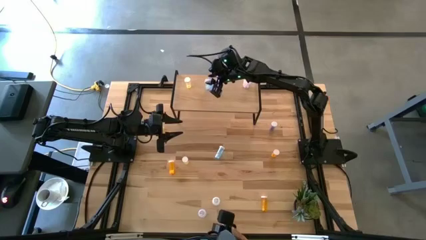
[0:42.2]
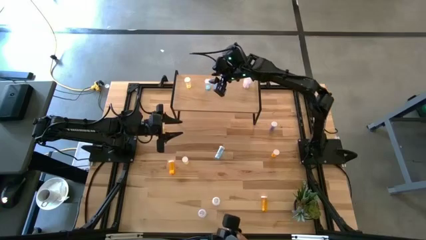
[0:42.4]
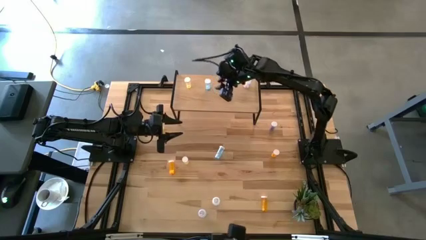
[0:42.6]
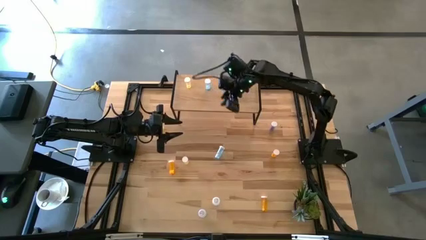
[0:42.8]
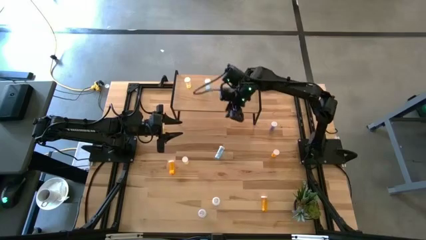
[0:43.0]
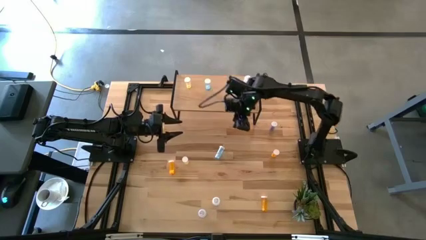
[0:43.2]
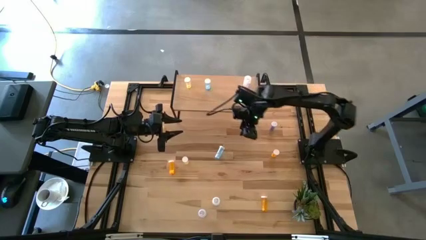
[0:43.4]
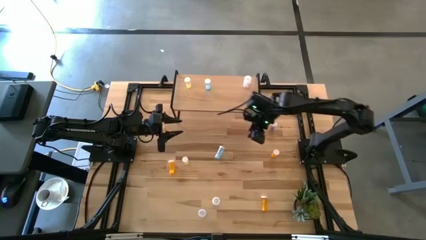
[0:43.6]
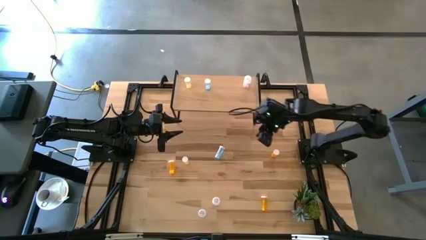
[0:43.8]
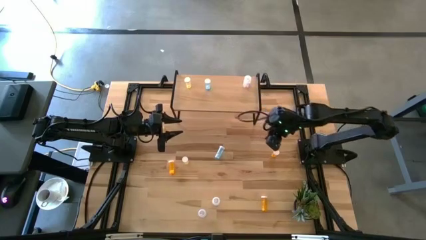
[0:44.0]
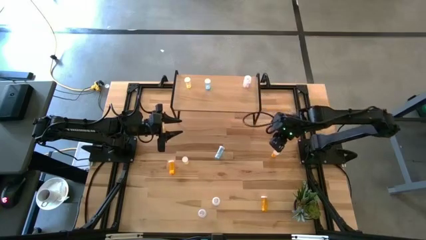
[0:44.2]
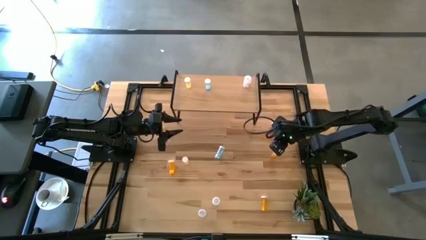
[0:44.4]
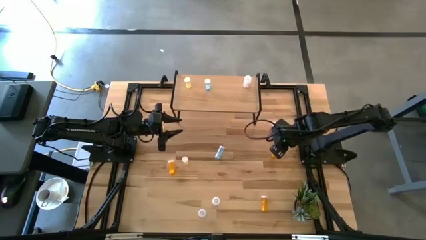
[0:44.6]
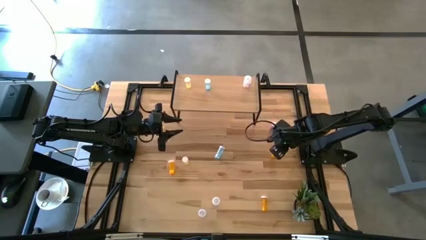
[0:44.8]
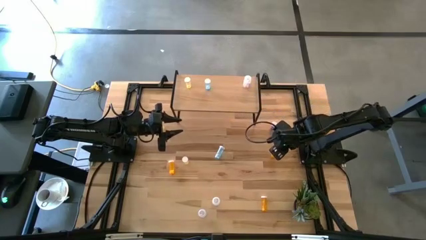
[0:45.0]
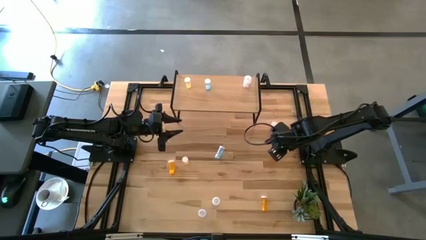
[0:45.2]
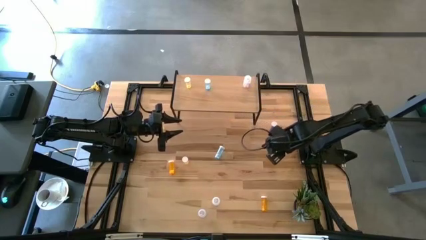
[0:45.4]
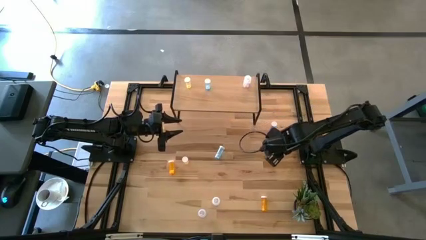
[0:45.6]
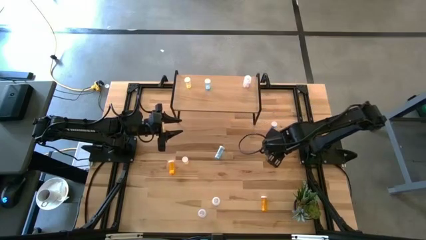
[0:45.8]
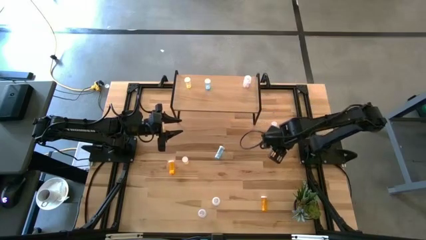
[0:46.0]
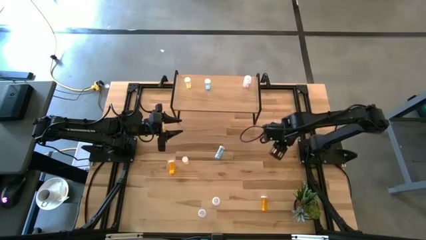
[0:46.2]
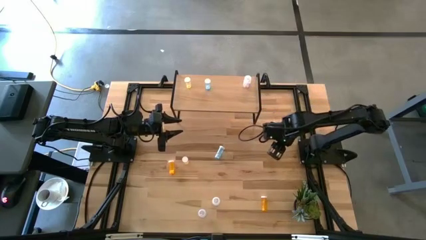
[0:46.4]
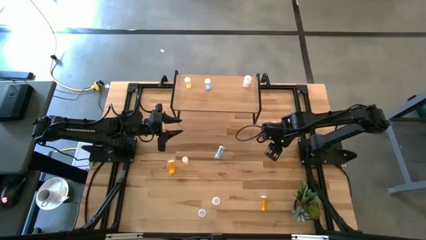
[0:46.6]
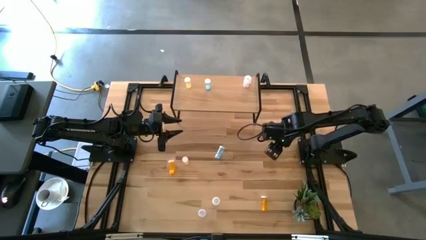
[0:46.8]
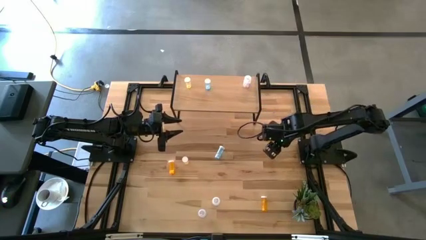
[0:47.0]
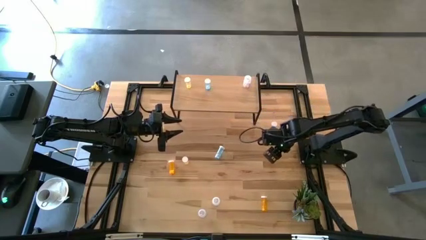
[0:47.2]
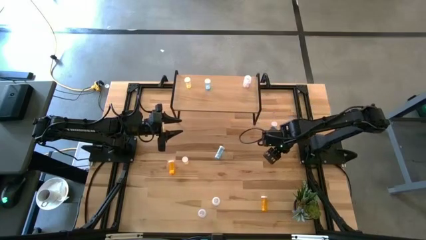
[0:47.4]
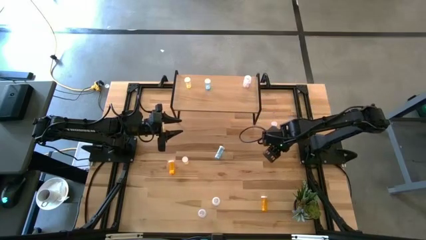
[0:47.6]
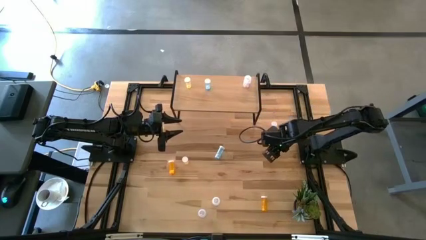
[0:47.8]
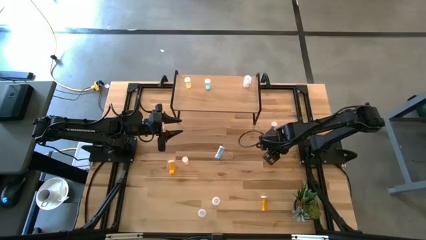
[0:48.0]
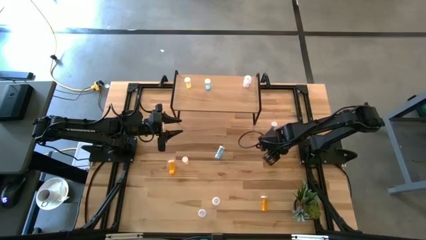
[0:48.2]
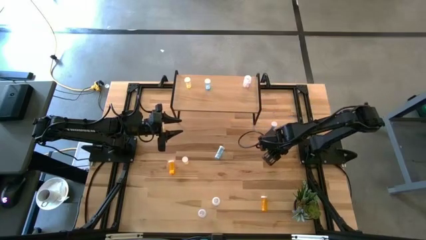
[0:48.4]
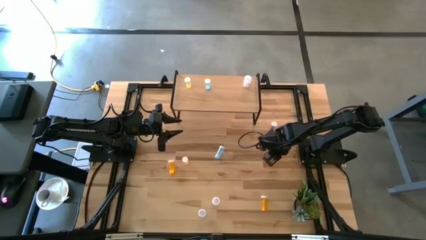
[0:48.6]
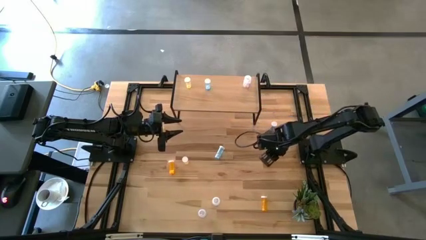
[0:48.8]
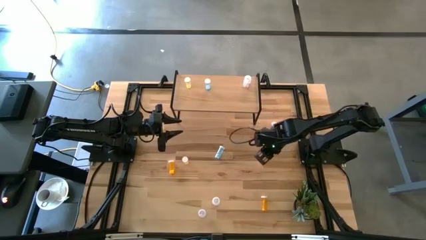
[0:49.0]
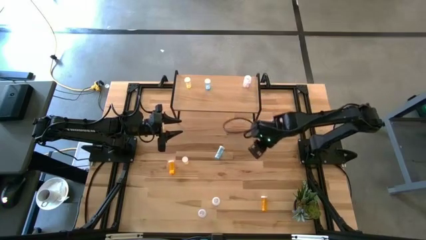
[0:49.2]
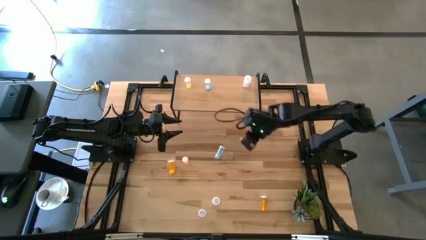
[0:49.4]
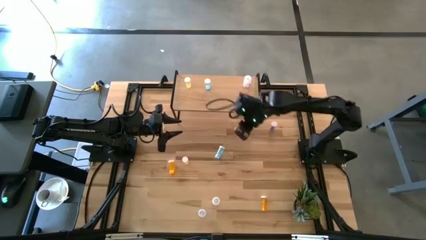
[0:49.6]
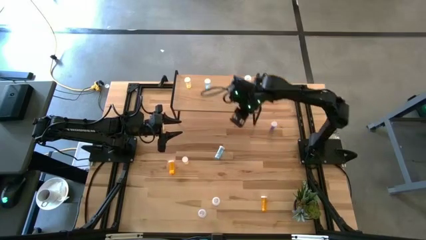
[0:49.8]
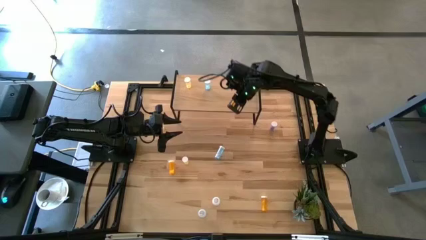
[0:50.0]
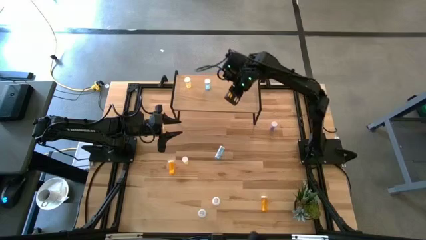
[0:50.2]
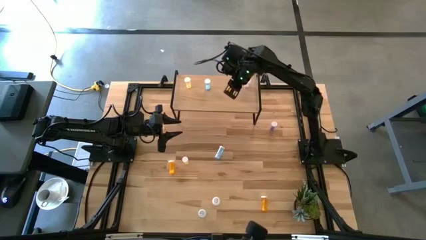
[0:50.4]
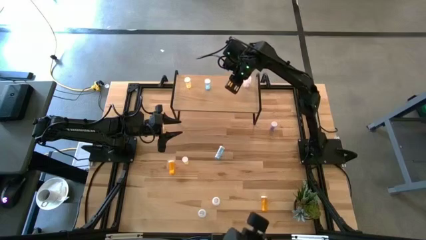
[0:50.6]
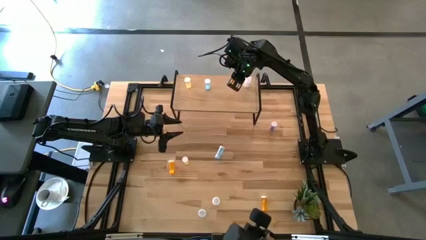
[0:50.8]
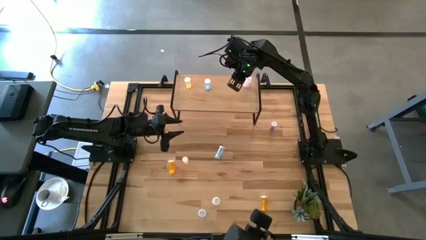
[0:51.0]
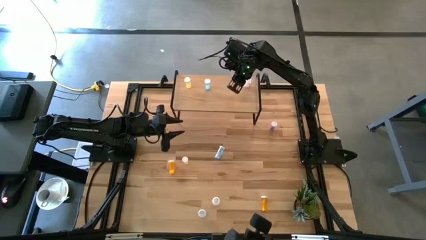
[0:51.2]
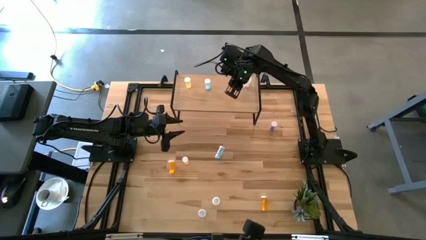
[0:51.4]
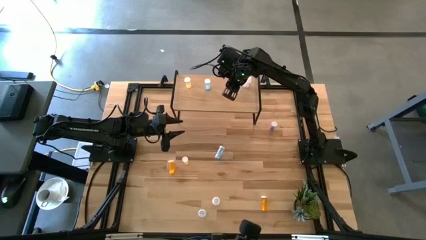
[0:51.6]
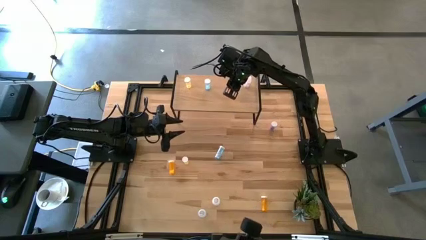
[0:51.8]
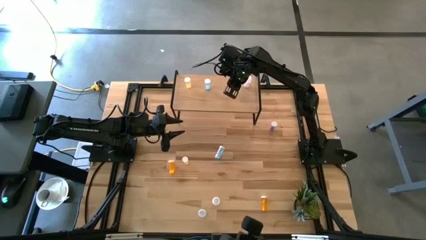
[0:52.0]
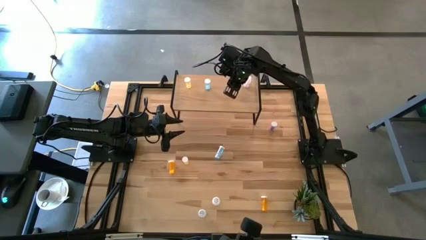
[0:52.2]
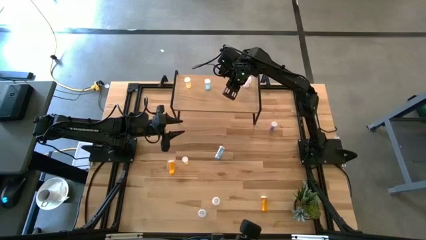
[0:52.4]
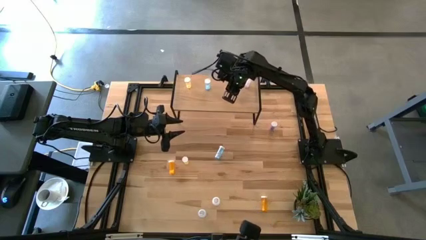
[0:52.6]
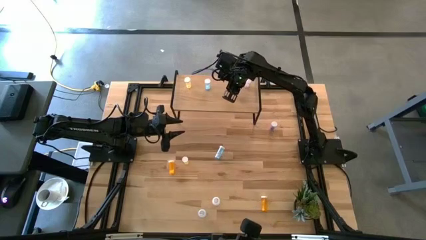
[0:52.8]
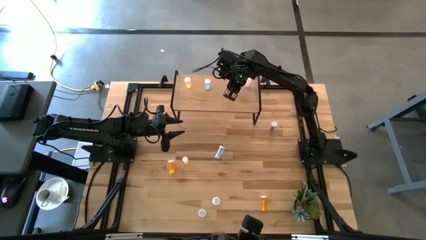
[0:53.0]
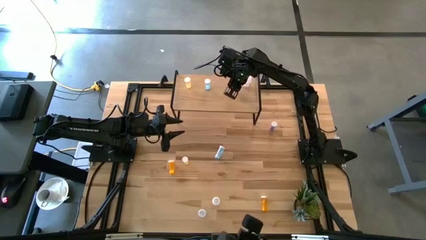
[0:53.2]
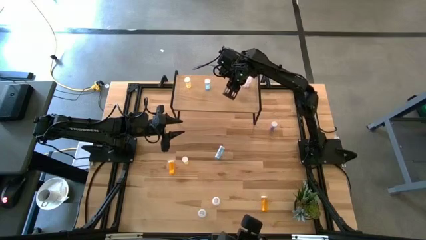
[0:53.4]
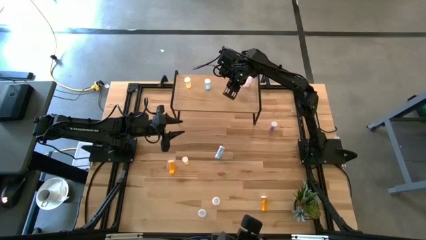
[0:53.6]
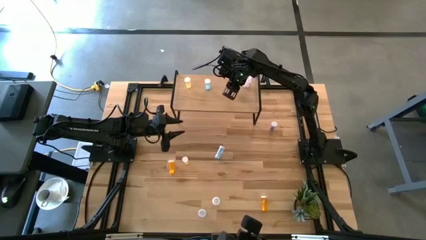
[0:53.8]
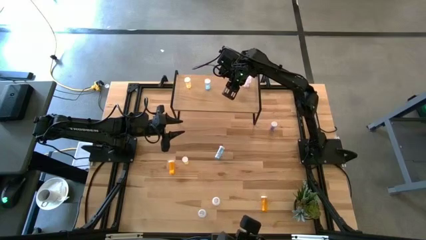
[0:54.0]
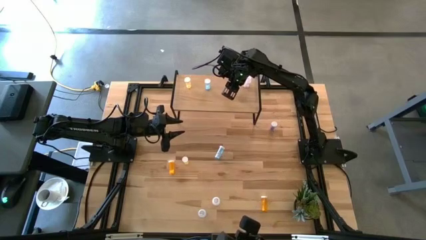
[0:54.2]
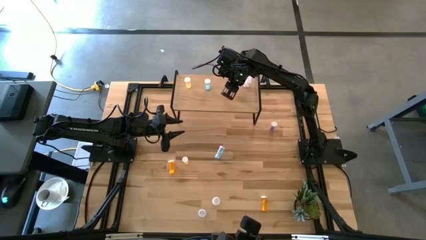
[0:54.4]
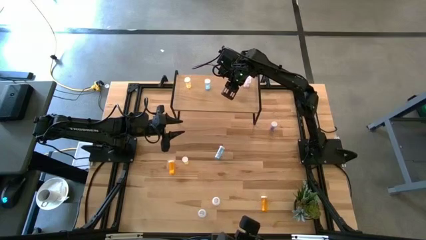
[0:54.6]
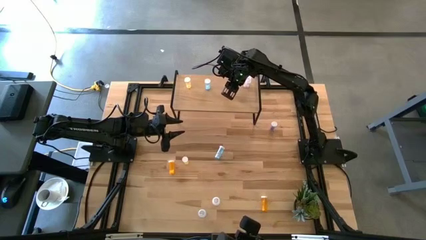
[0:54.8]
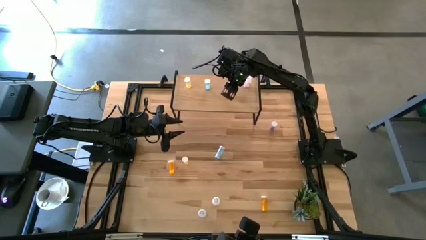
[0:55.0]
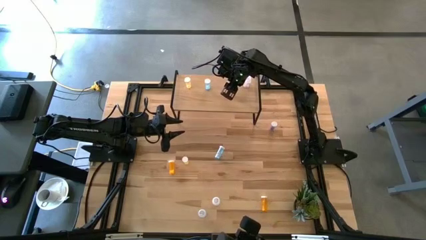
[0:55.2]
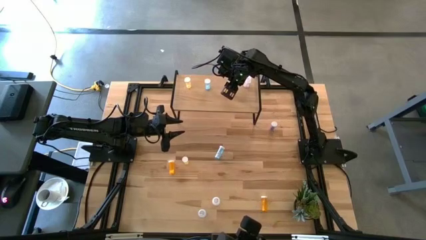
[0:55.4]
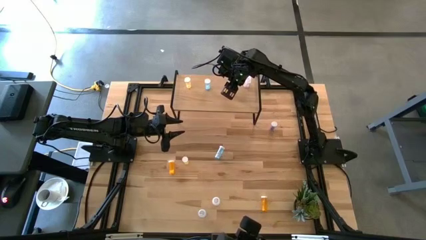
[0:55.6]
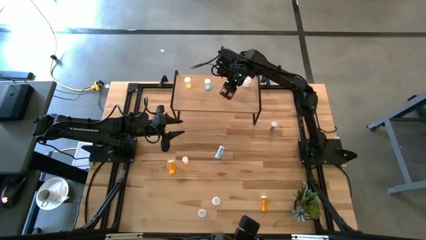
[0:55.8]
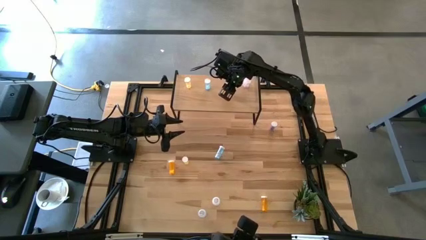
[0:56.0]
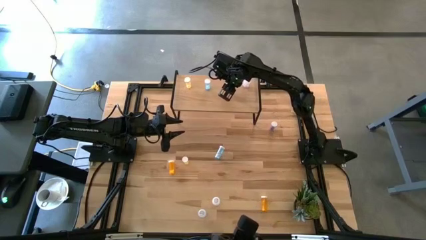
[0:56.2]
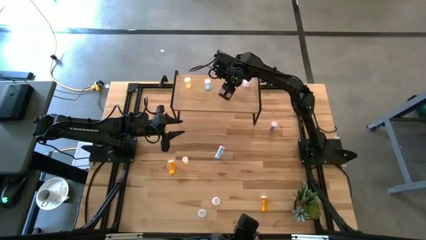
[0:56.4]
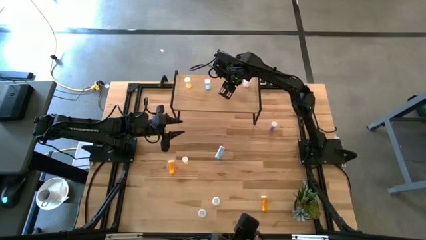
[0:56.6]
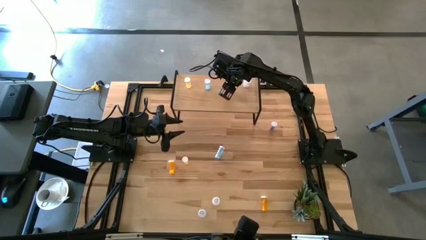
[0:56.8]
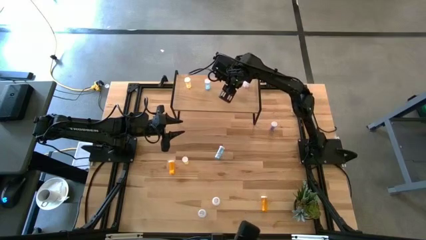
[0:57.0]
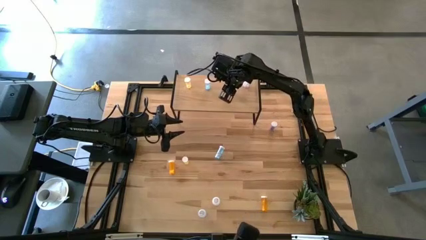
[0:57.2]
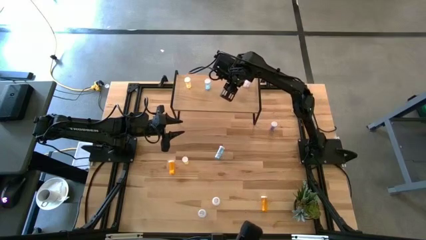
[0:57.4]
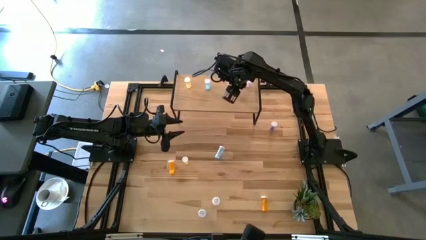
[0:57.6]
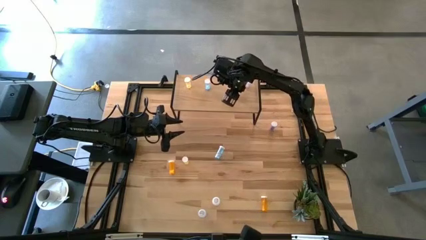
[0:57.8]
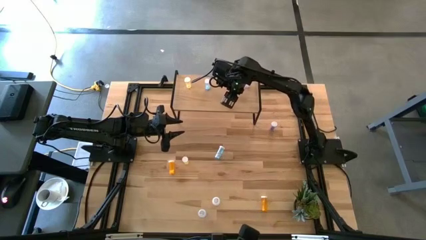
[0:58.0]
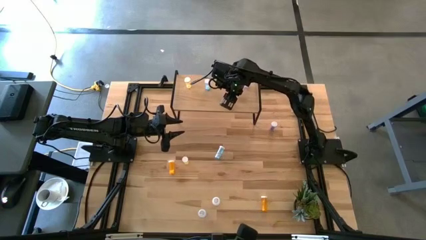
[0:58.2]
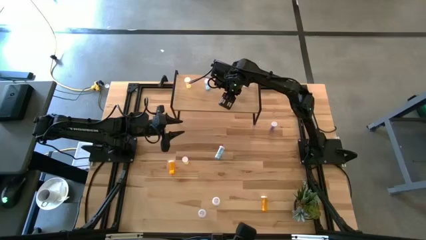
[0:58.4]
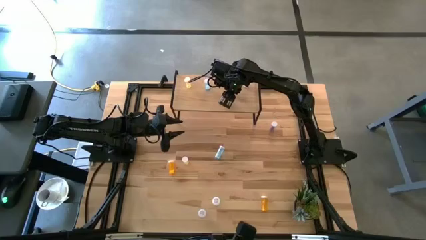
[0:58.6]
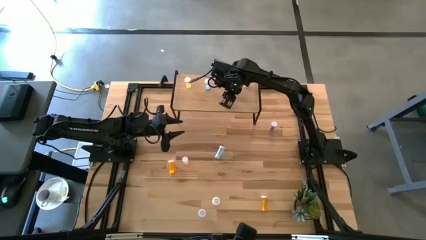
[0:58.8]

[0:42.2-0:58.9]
Task: Pick and place medicine bottles onto shelf by color
Put the top right orange pill bottle on the shelf

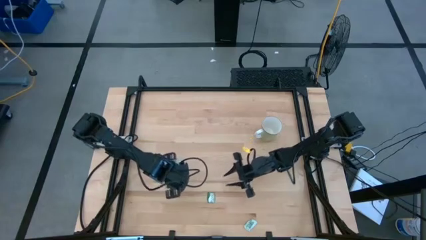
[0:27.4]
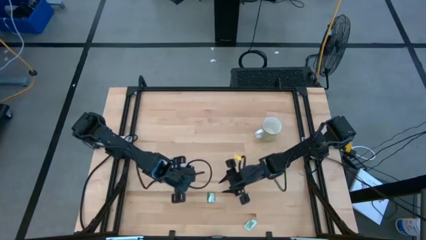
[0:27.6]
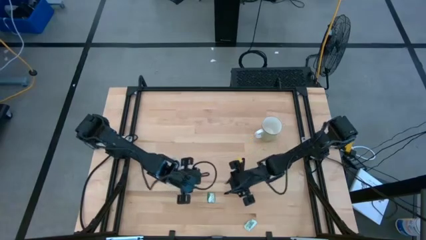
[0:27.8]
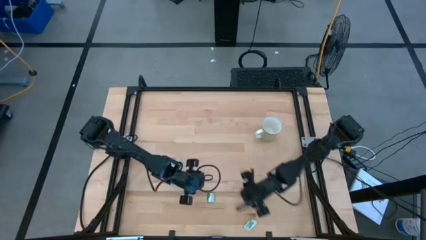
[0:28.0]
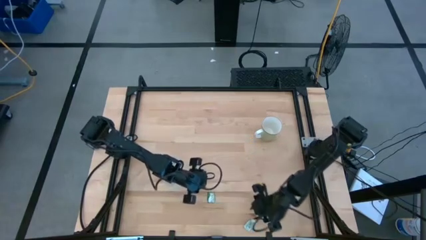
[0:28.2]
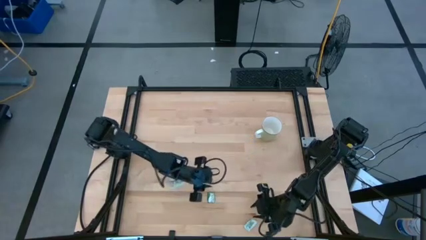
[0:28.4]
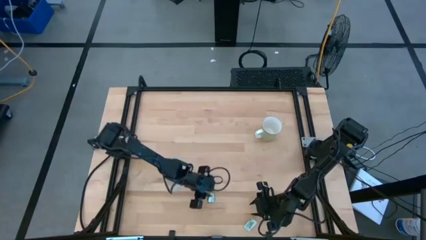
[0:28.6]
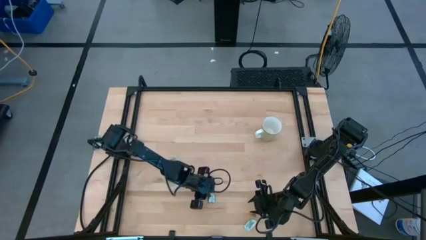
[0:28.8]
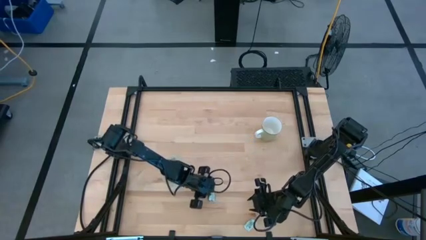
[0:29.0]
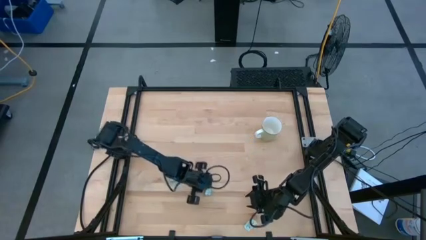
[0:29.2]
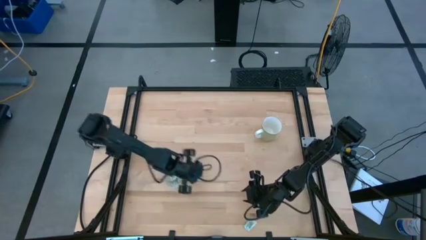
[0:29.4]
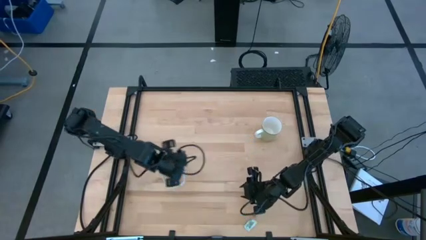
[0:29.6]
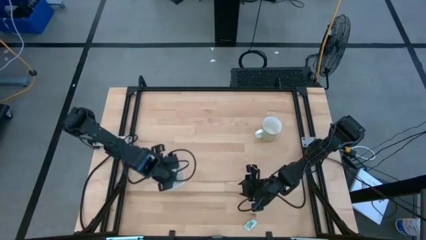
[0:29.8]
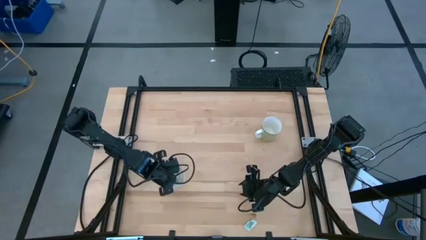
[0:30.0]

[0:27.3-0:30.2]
Task: Pick and place Stevia / Truvia into bins
Put the dark green truvia packet into the transparent bin
